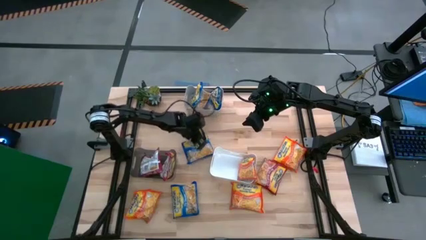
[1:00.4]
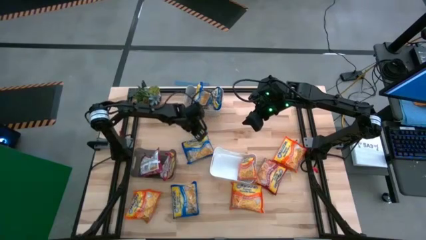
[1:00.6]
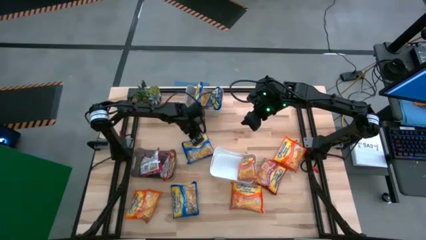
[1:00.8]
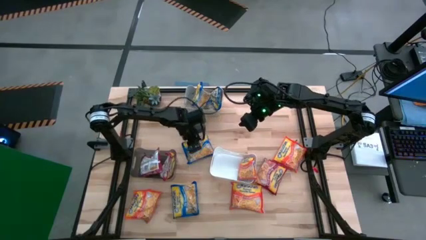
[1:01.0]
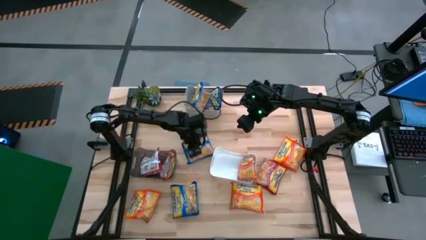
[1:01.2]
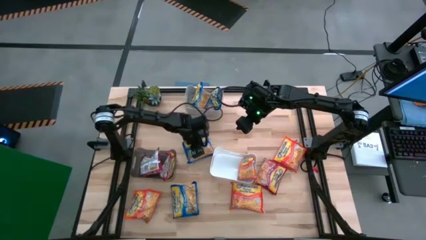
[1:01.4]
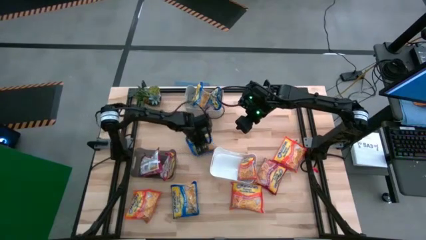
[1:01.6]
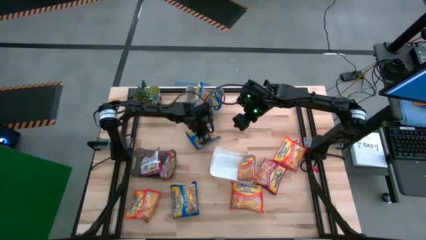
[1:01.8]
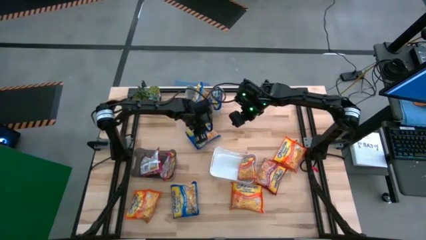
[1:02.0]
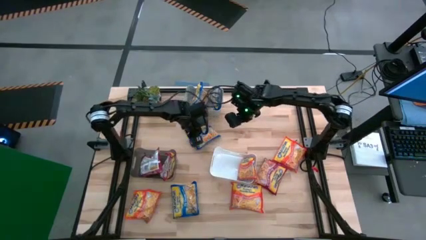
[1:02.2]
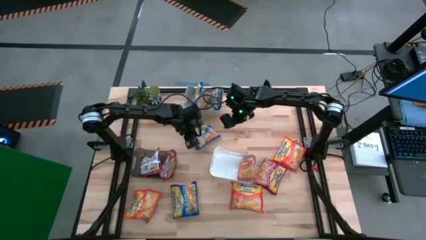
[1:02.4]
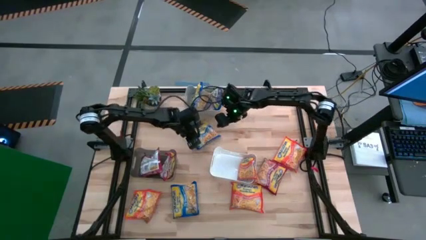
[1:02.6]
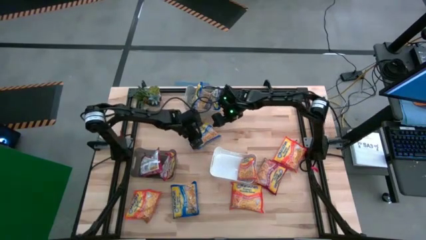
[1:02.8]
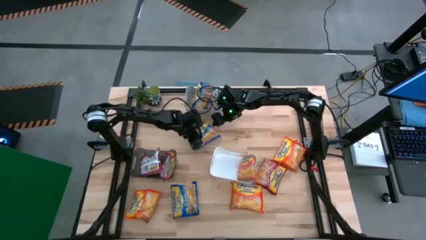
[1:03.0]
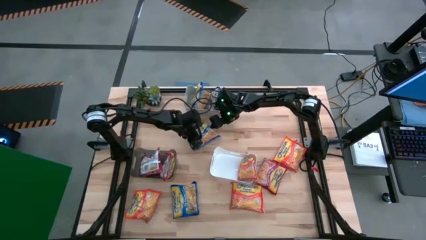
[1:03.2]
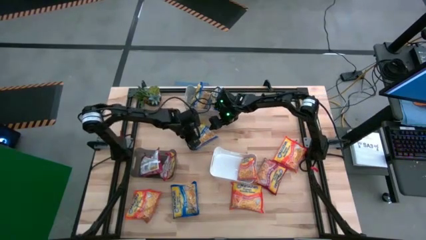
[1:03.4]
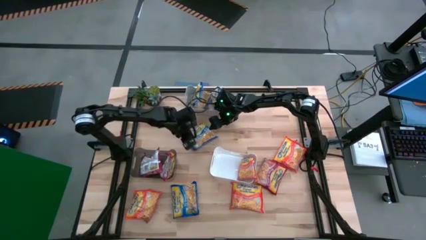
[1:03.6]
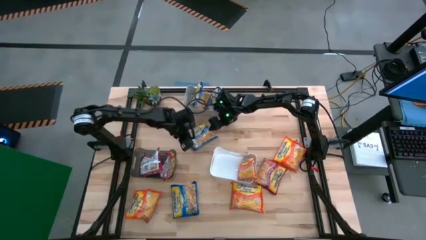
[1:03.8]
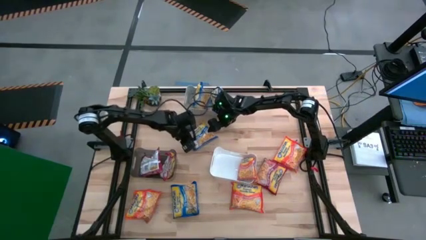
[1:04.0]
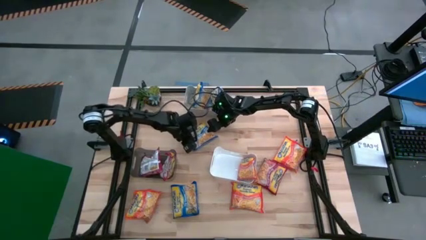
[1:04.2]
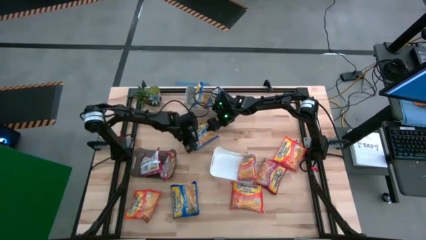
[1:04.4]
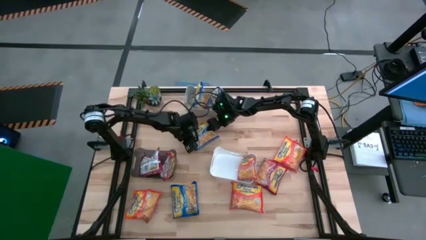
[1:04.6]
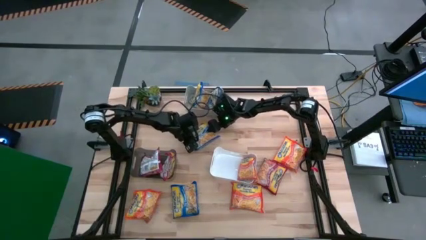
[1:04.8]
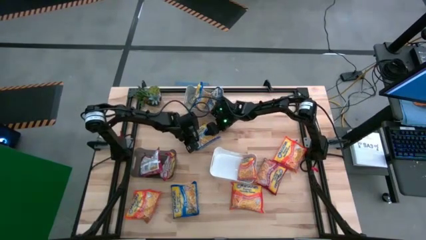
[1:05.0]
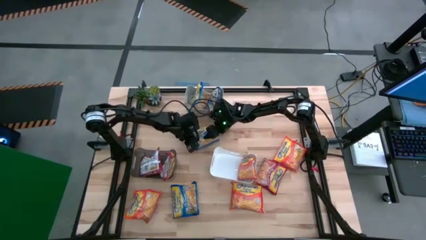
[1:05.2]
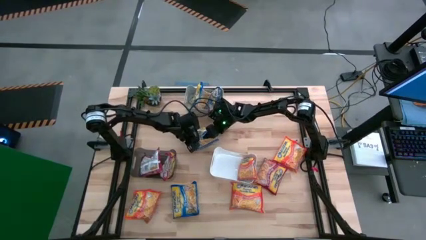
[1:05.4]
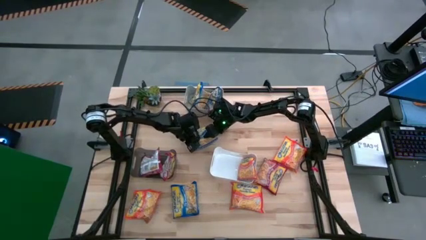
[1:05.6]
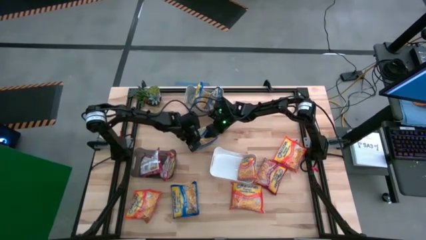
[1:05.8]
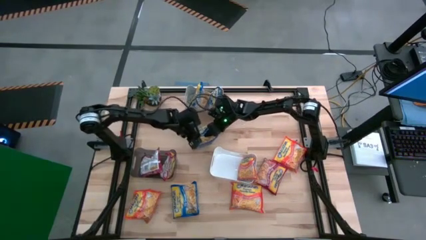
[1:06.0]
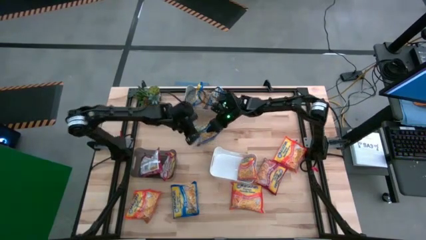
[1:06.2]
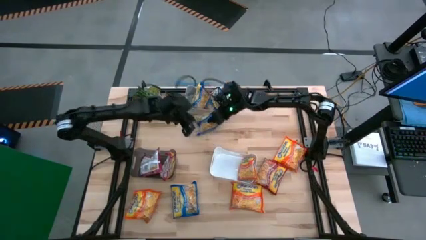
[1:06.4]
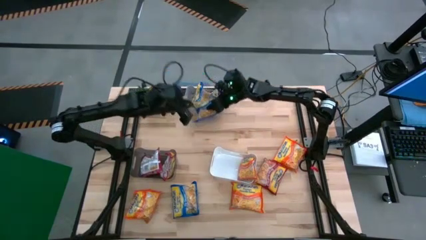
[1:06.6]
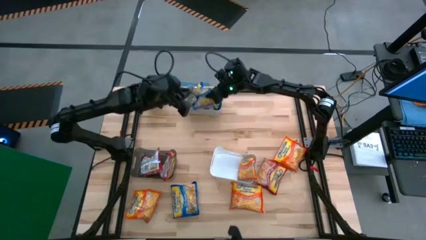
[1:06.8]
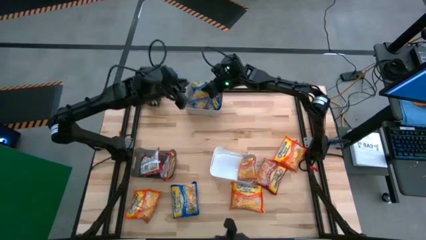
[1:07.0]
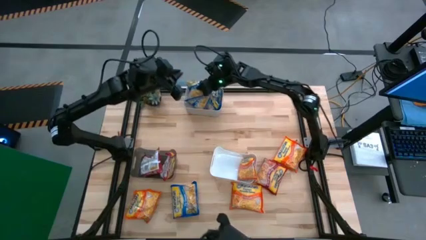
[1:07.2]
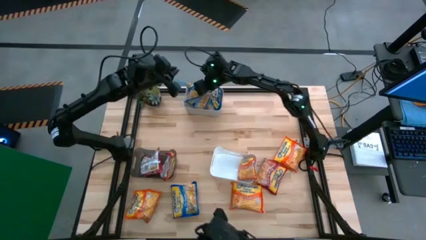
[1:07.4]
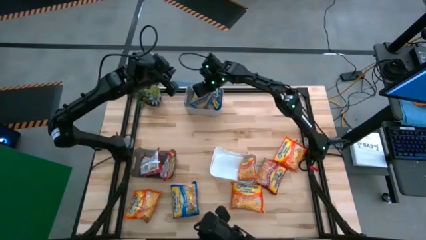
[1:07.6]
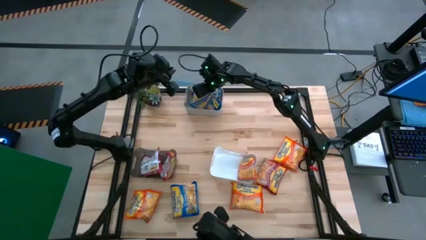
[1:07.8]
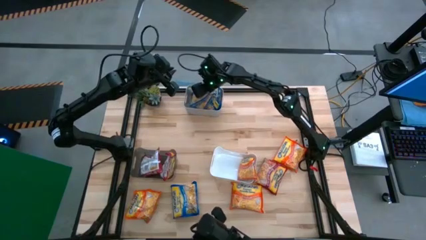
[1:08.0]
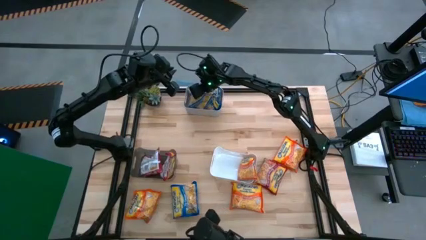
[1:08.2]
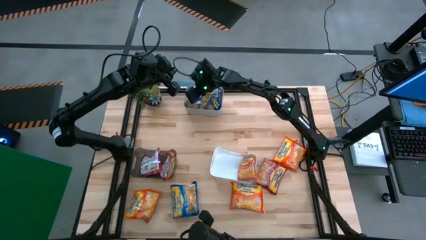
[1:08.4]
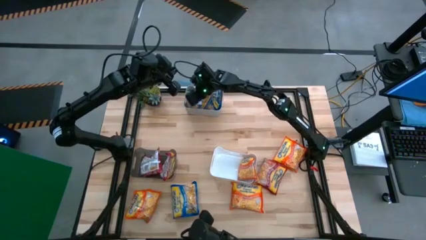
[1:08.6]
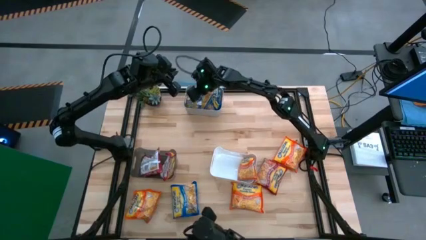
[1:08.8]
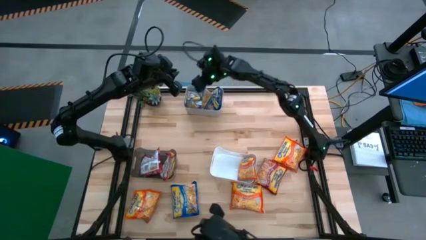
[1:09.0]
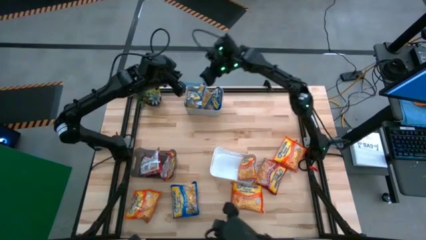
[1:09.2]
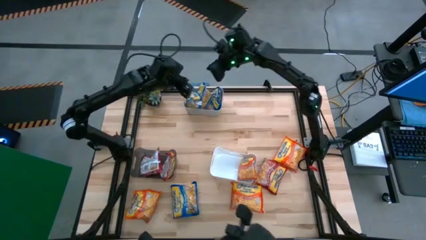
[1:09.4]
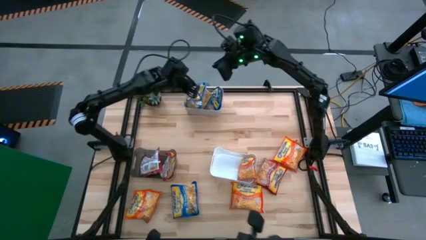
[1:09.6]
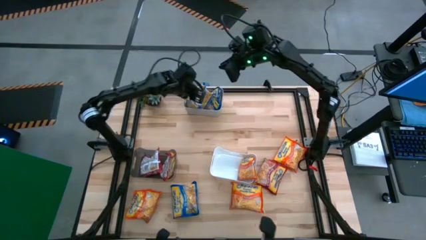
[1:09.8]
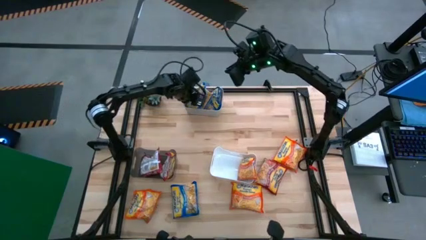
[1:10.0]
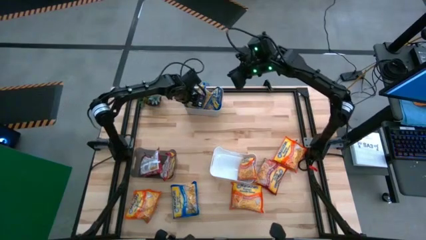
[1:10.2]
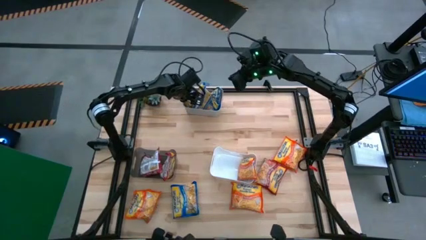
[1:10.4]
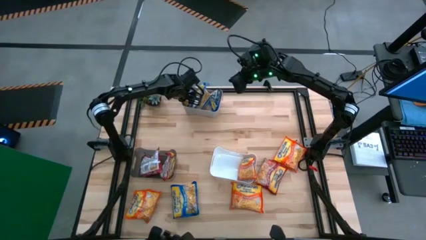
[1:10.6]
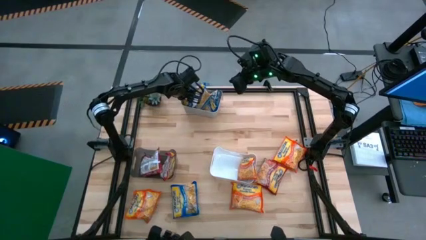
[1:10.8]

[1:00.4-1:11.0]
Task: Sort Maruchan noodles
Put the blue noodle pack into the gray bin
